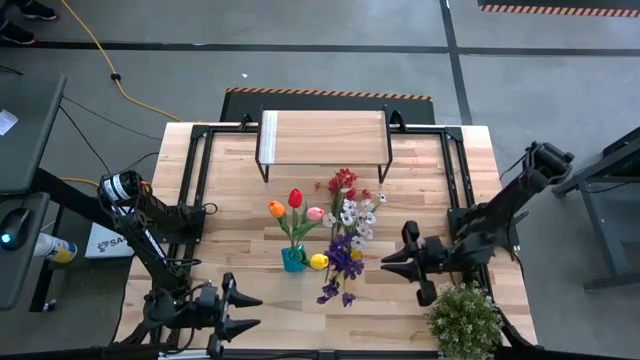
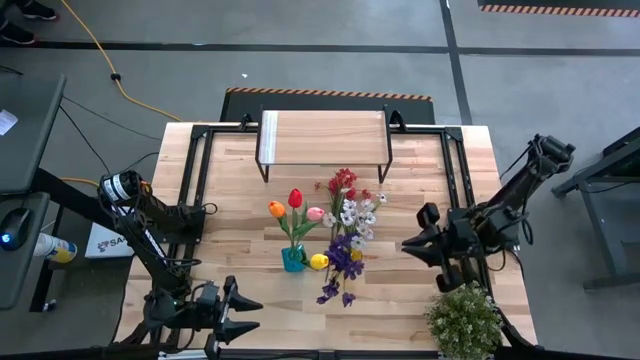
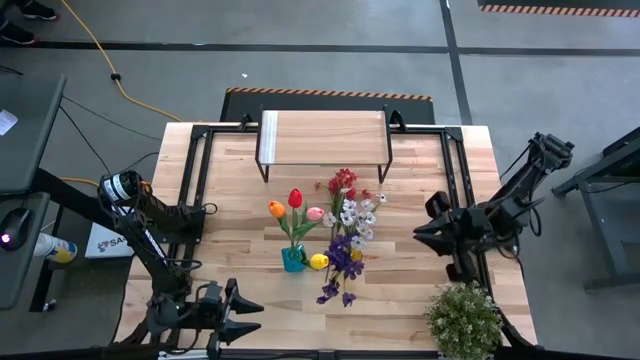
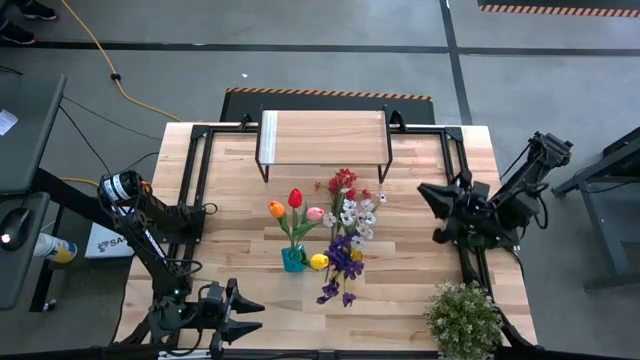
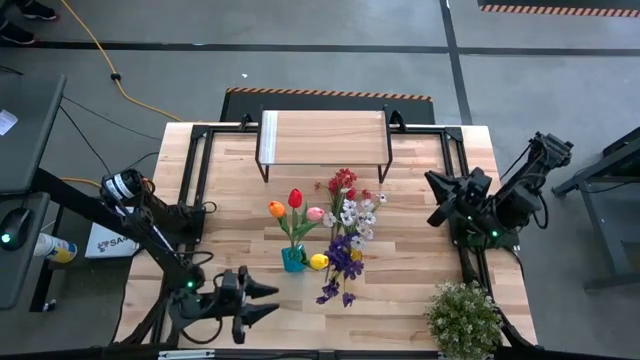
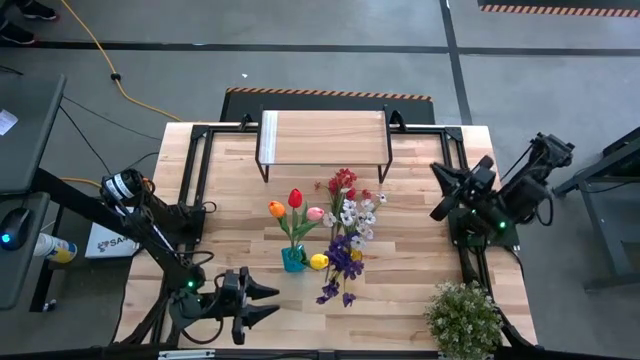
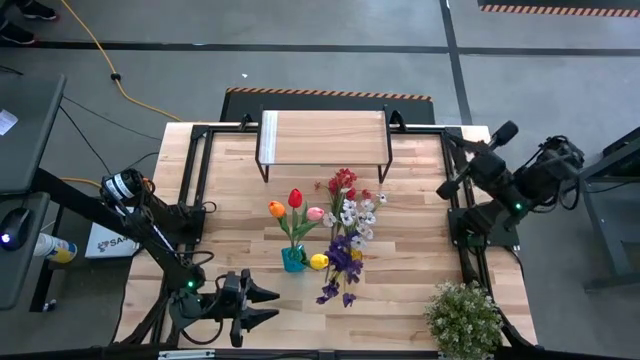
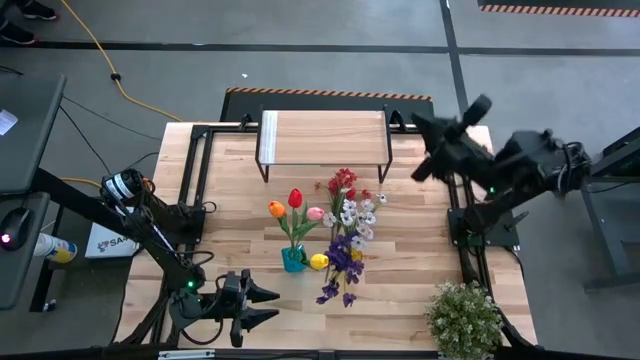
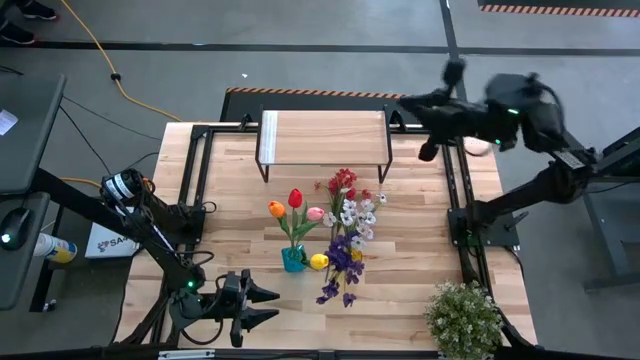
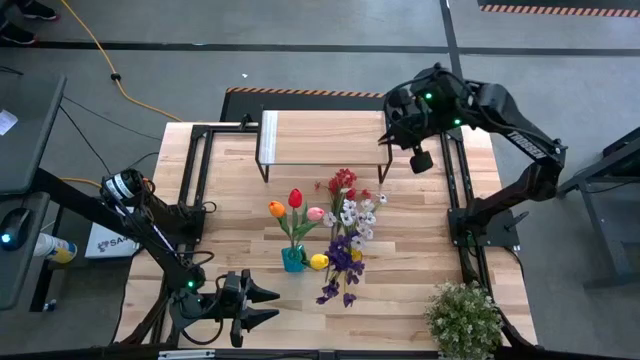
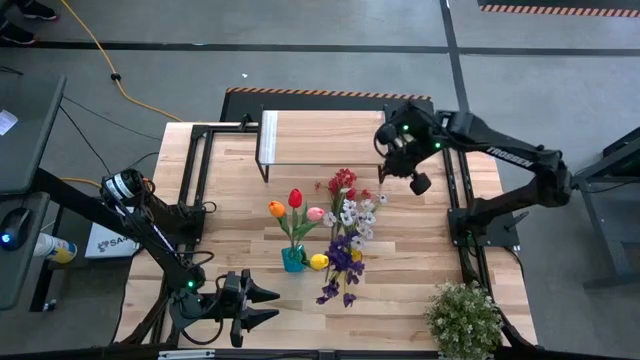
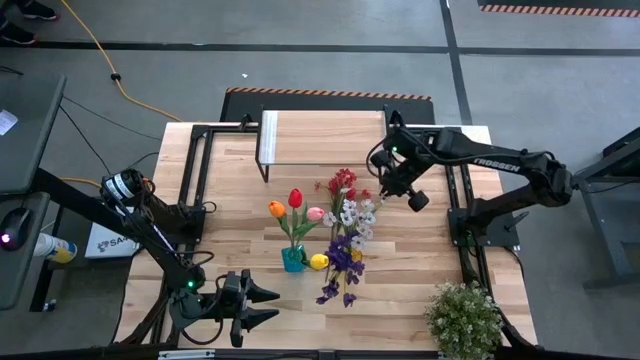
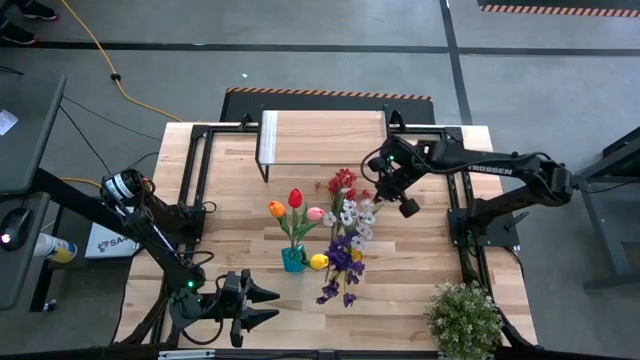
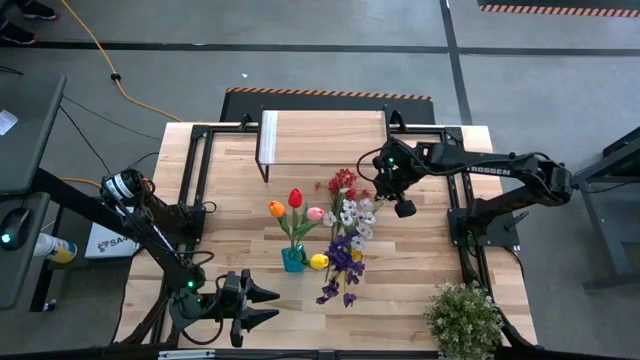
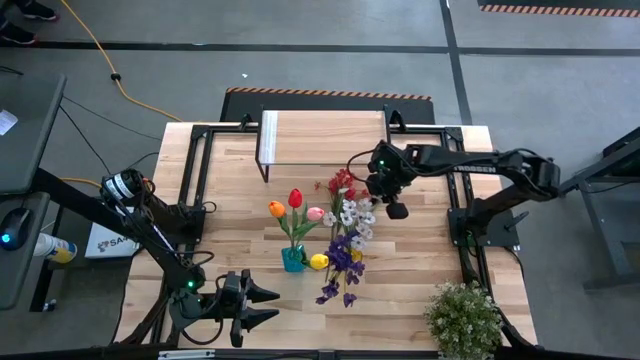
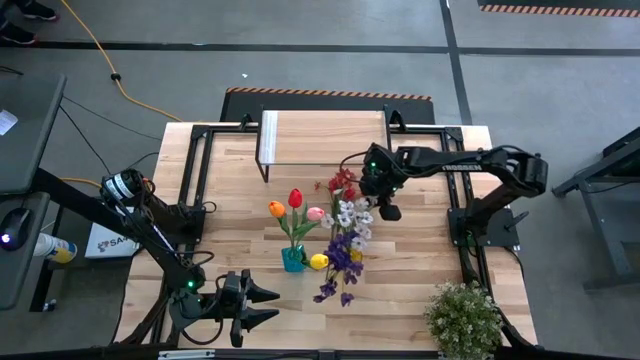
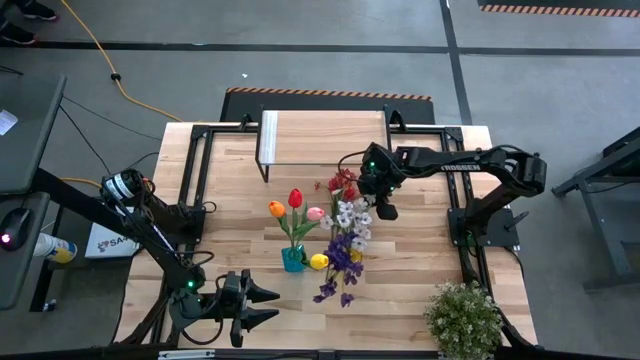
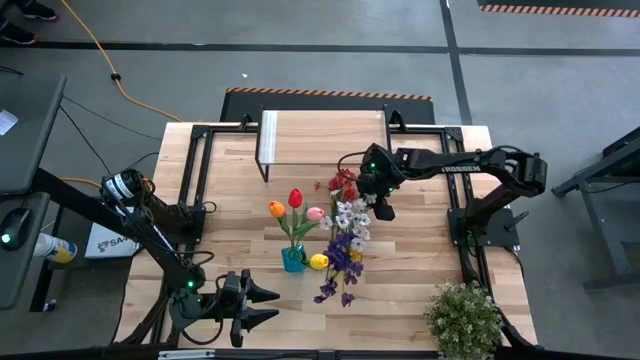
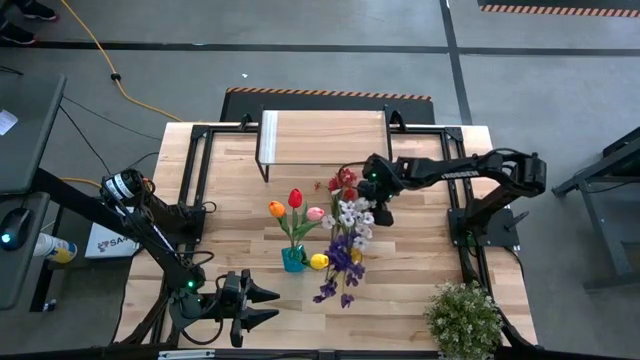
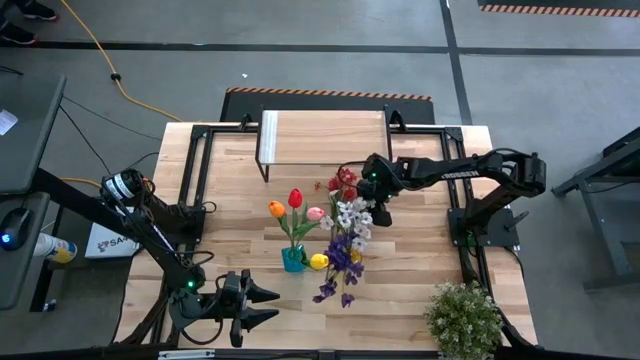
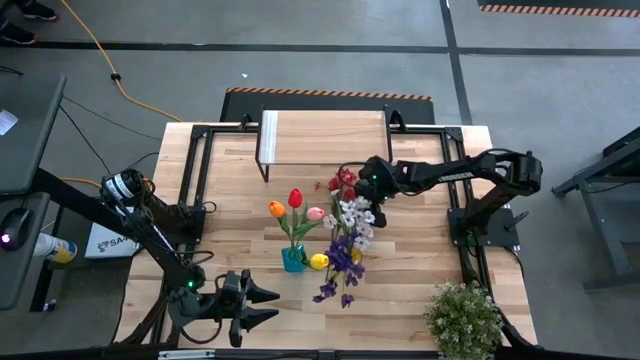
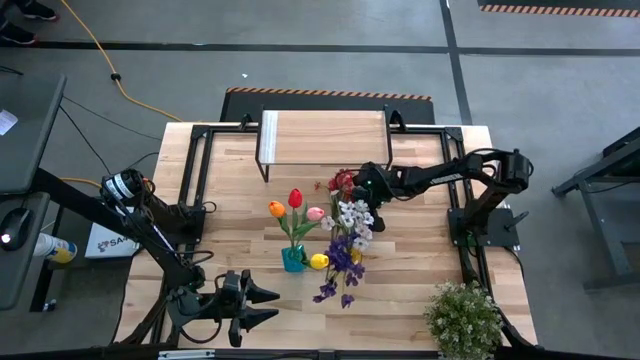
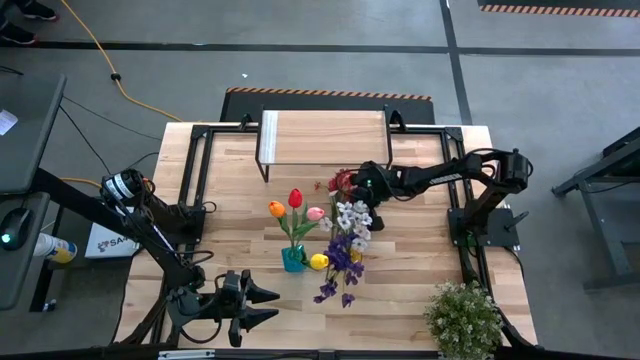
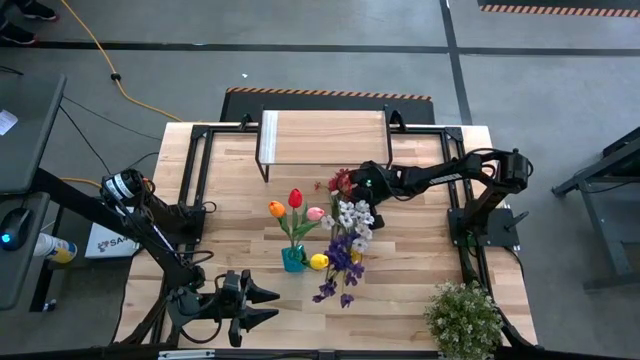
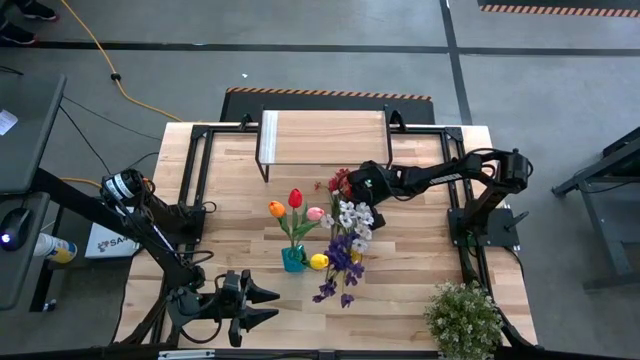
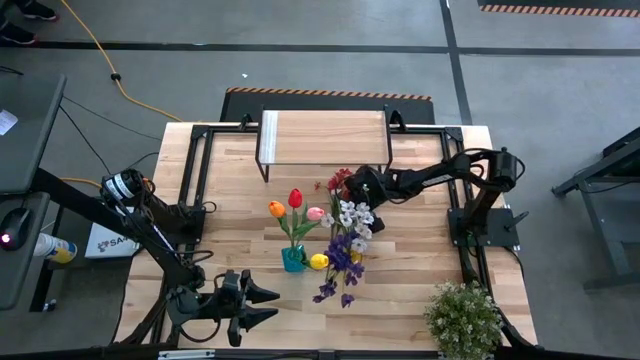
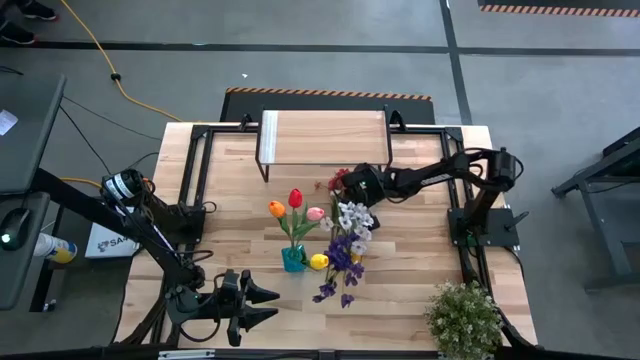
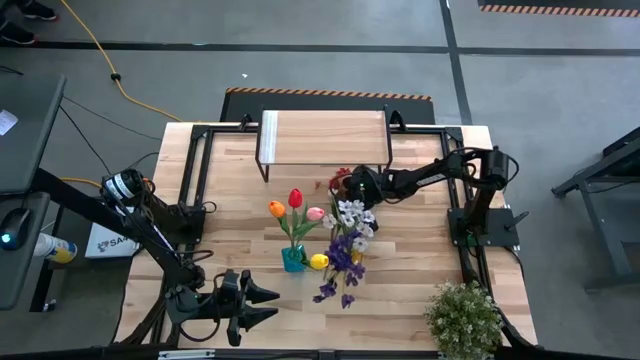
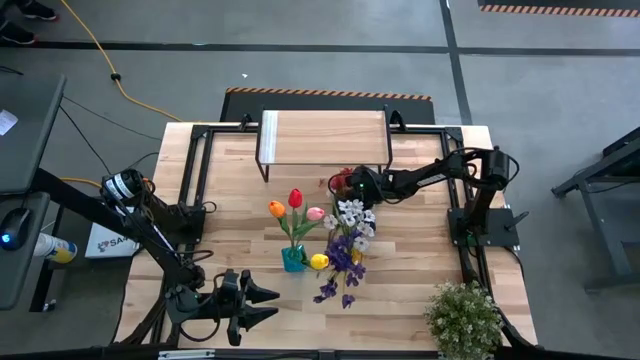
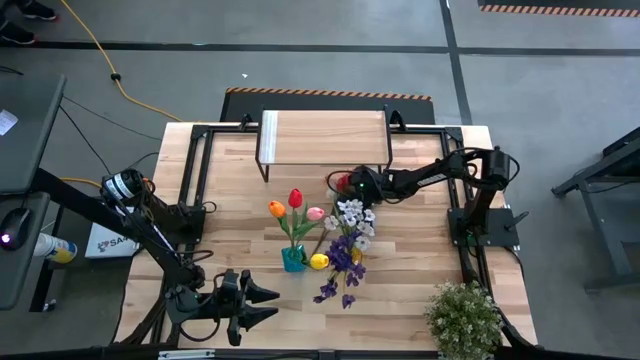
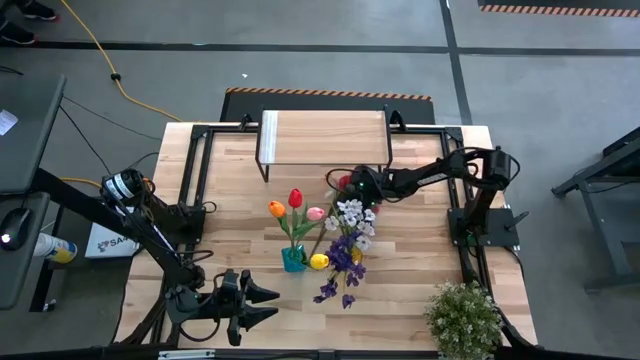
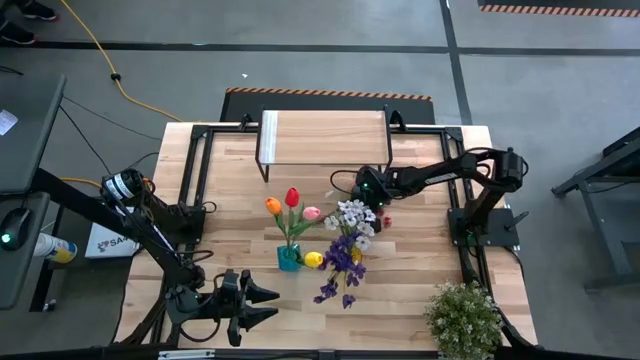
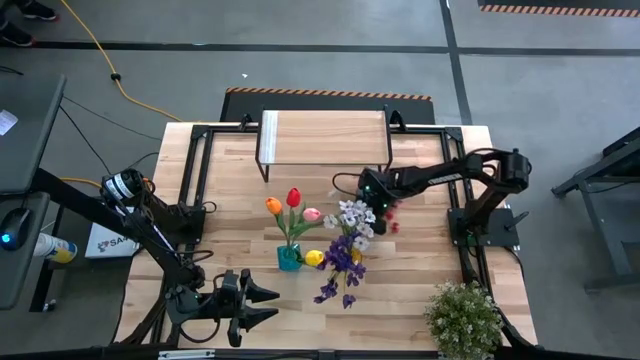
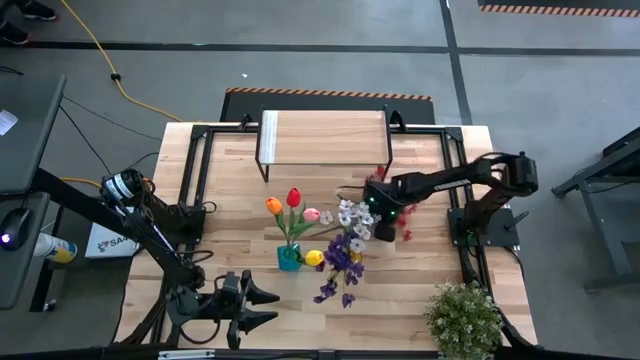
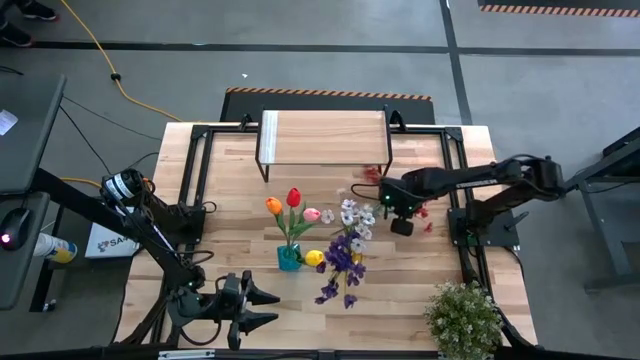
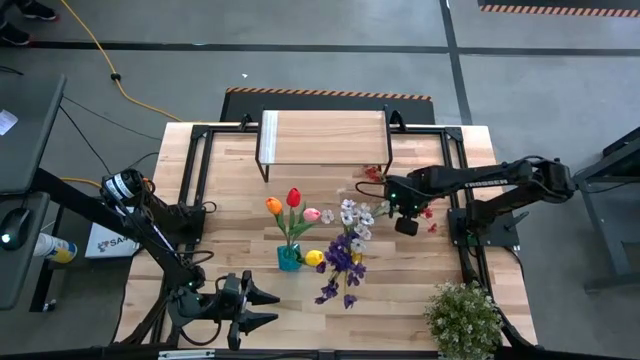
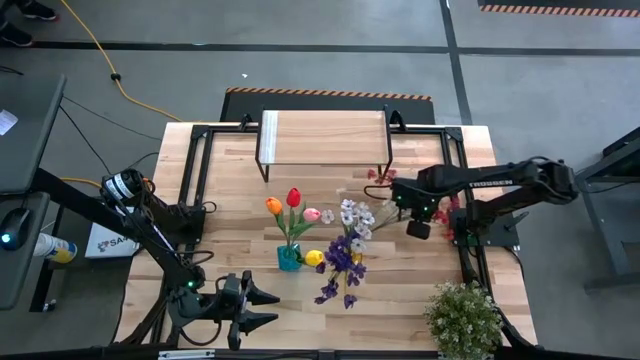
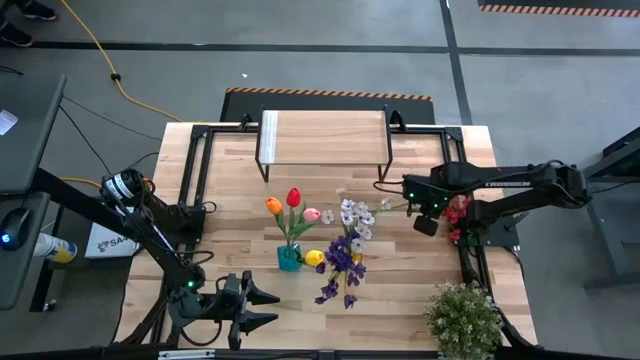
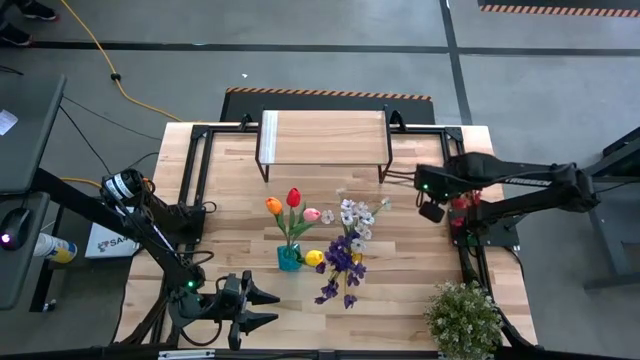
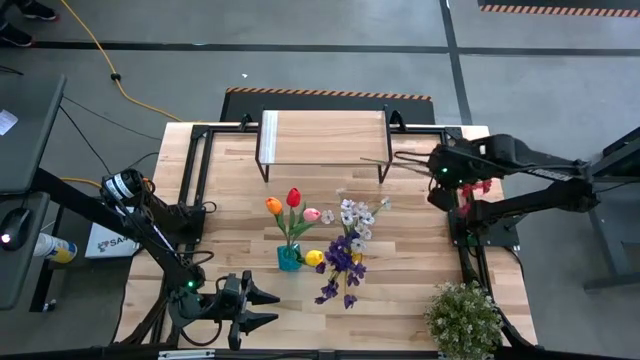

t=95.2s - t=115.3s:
Task: Pick and place flowers into a vace then onto a shelf
Put the red flowers into the yellow vase
